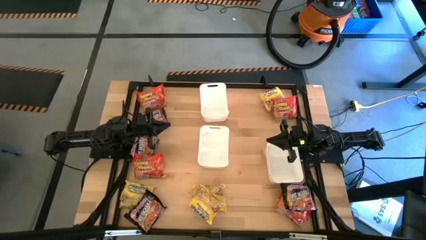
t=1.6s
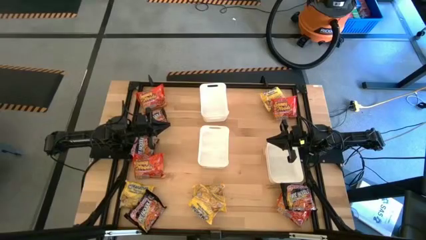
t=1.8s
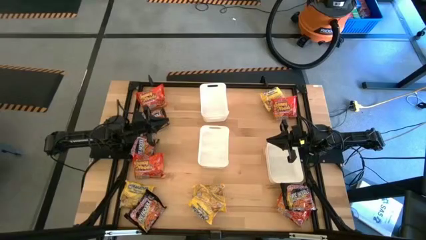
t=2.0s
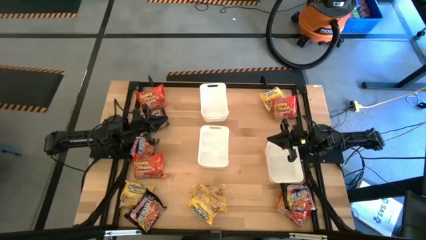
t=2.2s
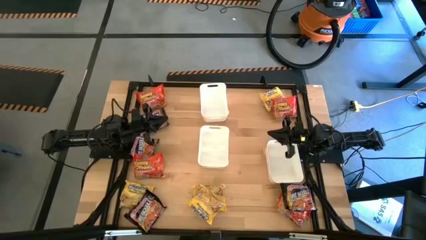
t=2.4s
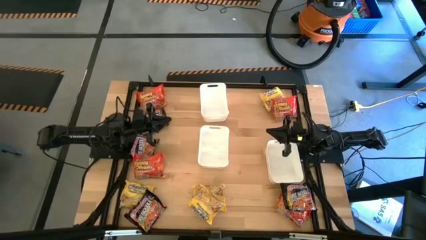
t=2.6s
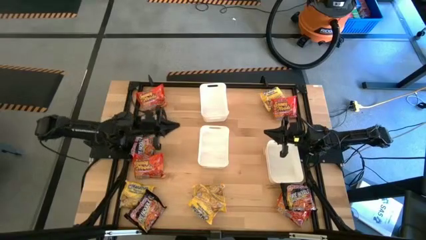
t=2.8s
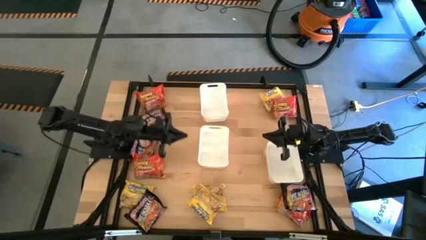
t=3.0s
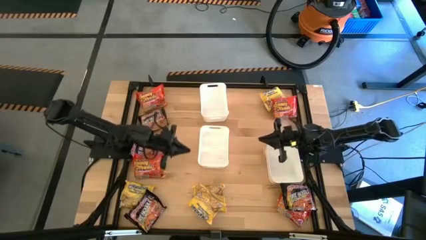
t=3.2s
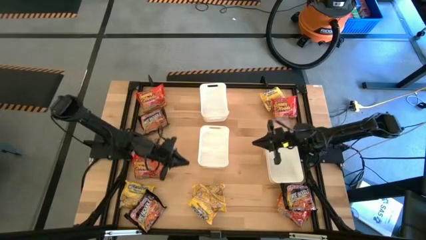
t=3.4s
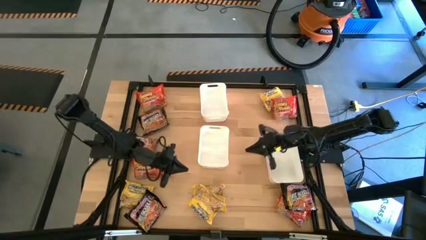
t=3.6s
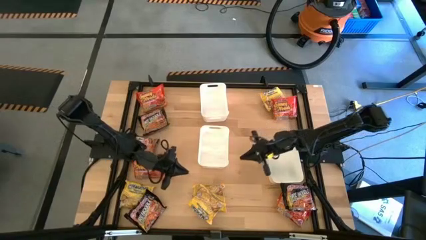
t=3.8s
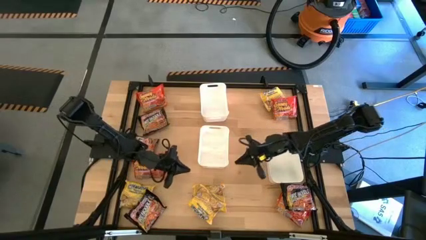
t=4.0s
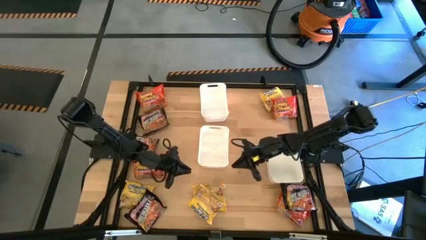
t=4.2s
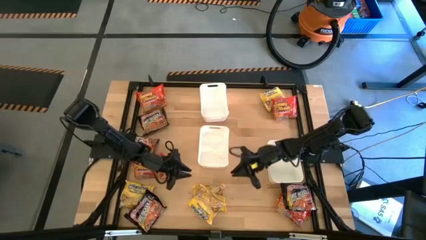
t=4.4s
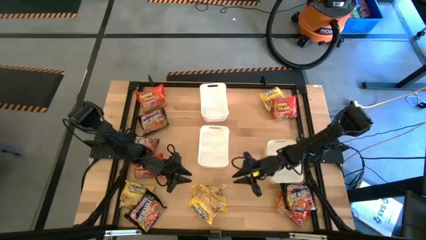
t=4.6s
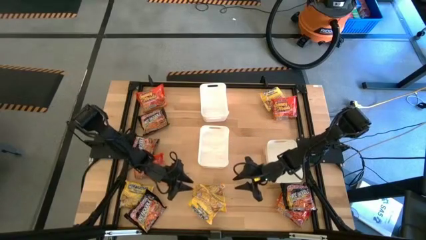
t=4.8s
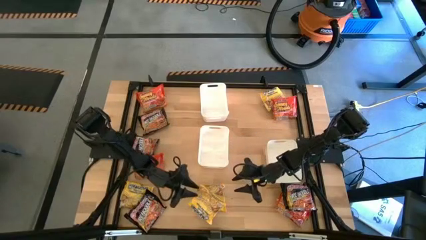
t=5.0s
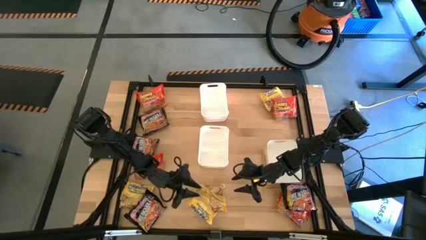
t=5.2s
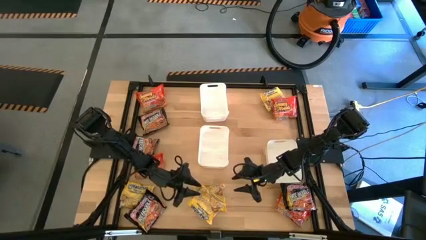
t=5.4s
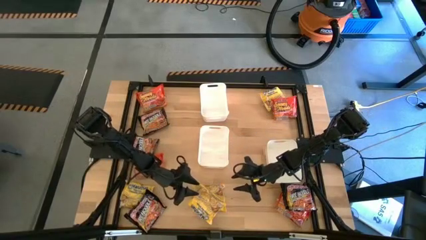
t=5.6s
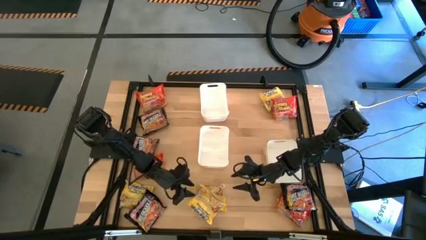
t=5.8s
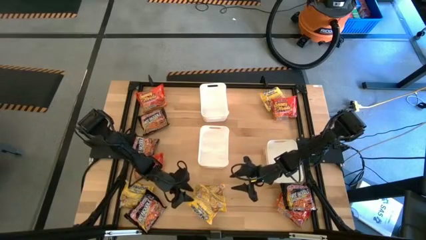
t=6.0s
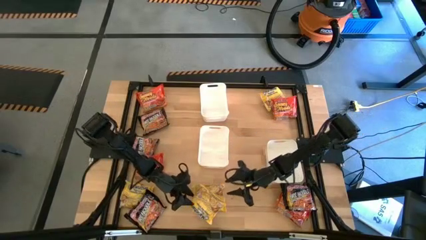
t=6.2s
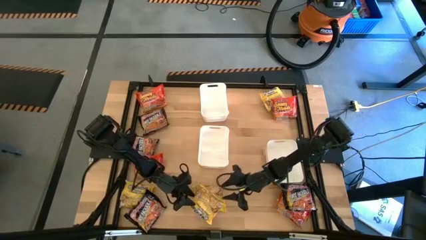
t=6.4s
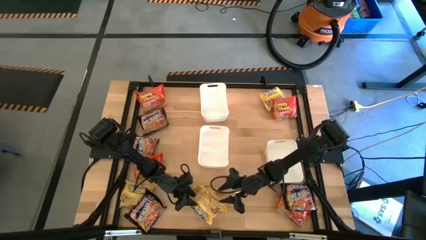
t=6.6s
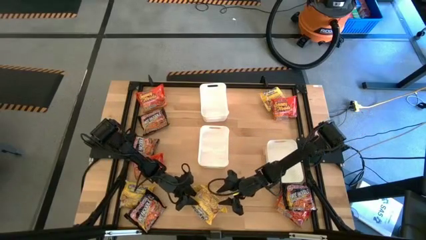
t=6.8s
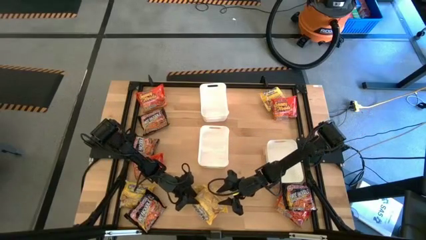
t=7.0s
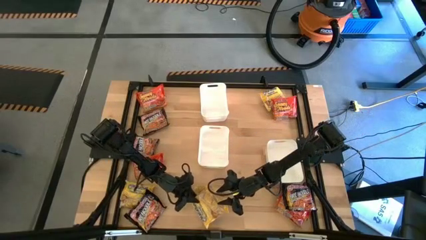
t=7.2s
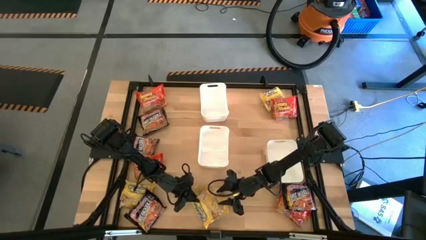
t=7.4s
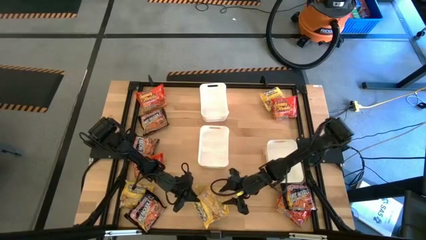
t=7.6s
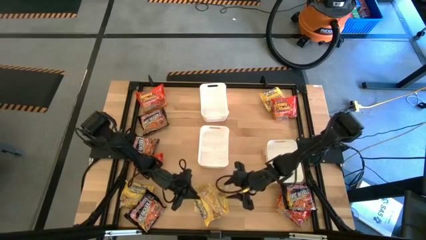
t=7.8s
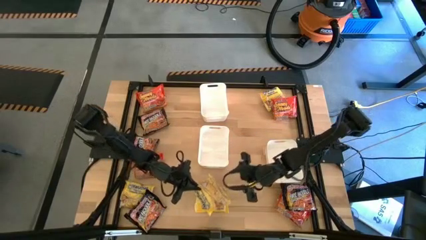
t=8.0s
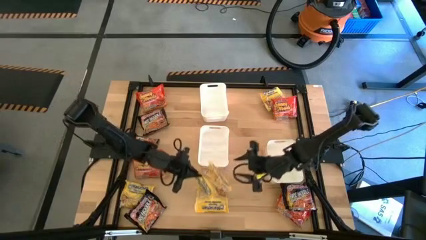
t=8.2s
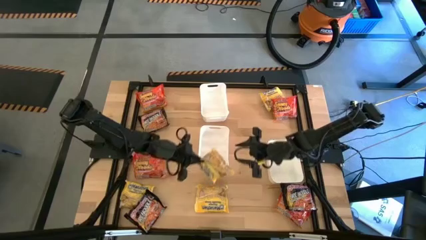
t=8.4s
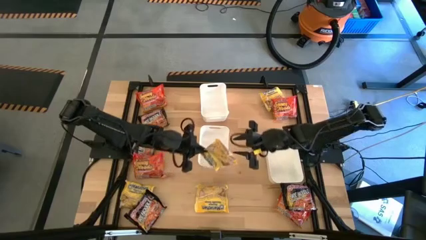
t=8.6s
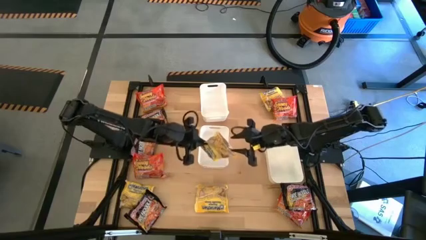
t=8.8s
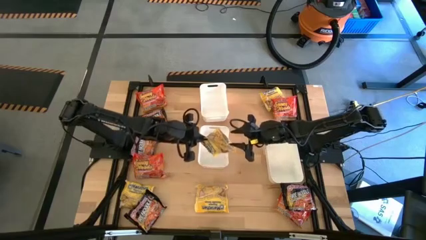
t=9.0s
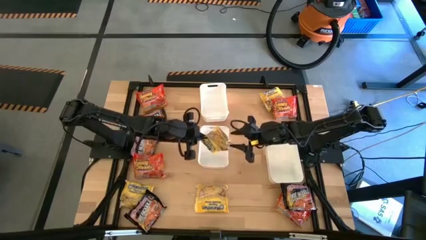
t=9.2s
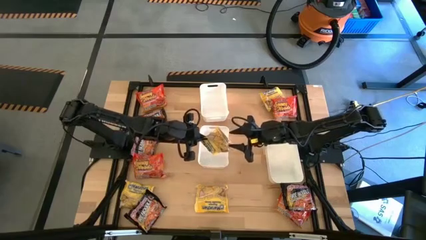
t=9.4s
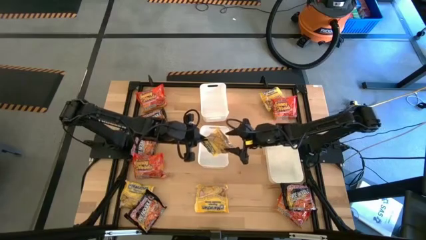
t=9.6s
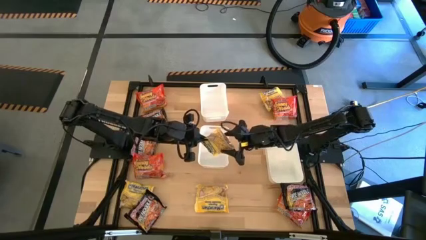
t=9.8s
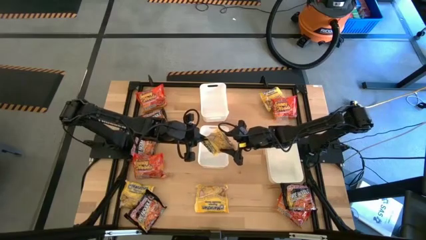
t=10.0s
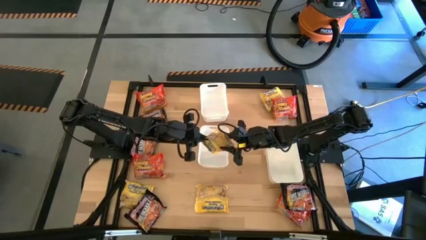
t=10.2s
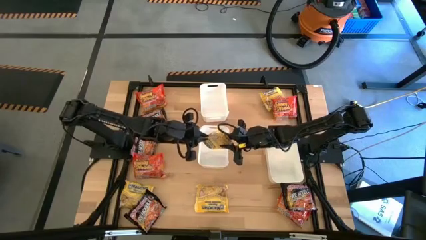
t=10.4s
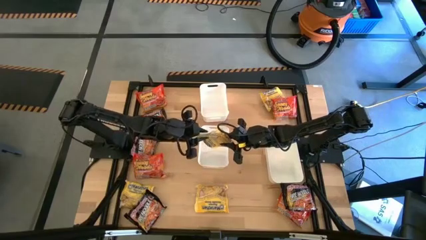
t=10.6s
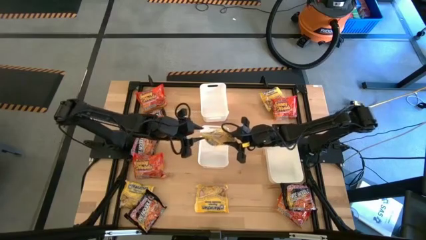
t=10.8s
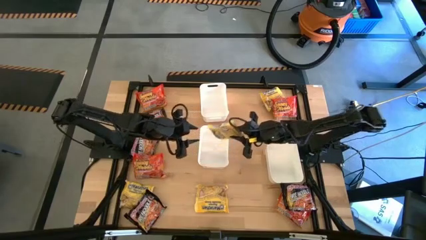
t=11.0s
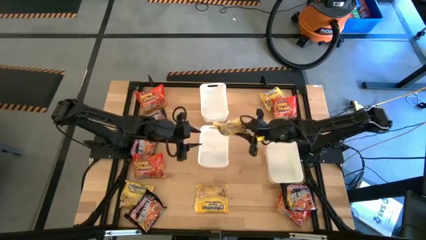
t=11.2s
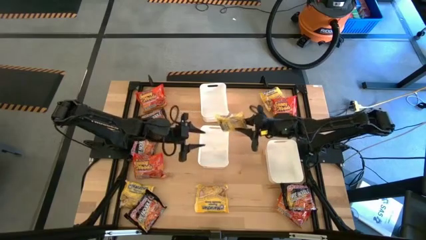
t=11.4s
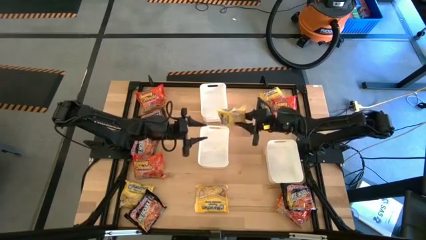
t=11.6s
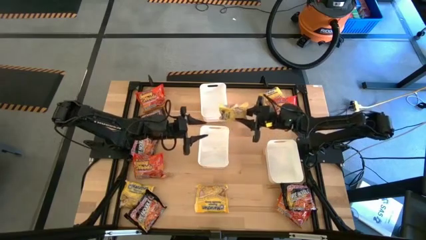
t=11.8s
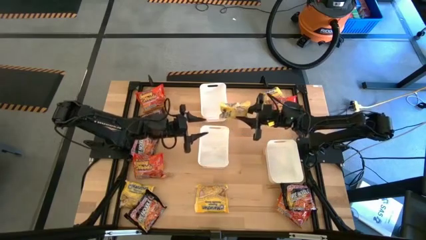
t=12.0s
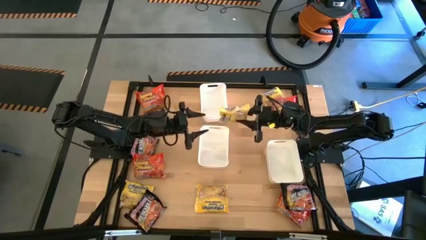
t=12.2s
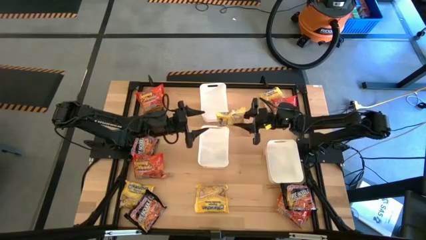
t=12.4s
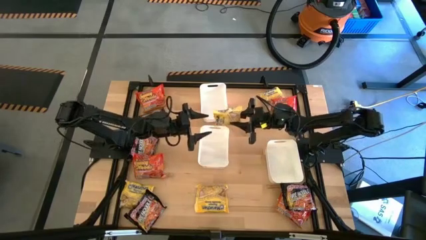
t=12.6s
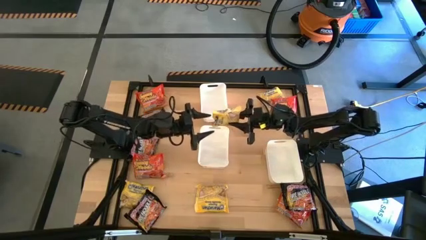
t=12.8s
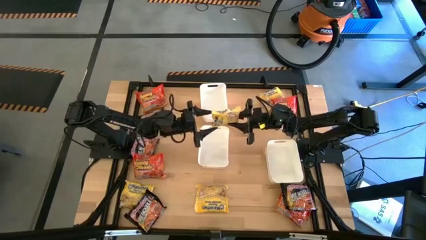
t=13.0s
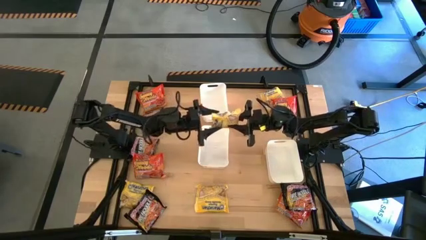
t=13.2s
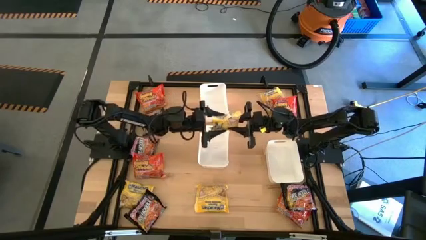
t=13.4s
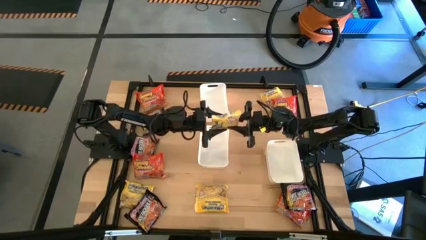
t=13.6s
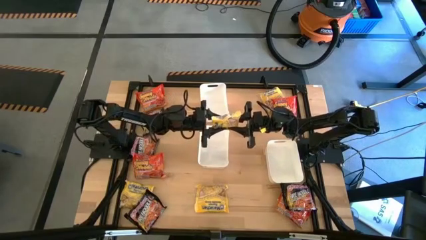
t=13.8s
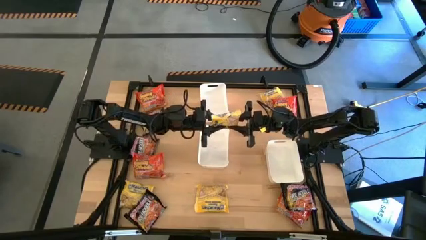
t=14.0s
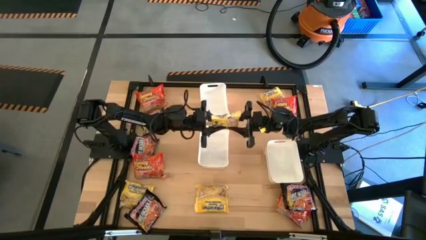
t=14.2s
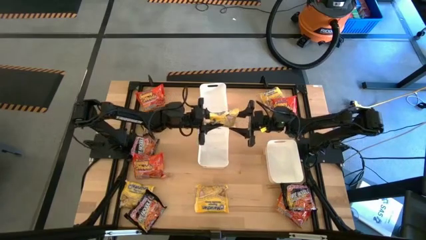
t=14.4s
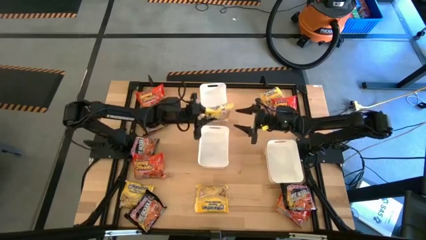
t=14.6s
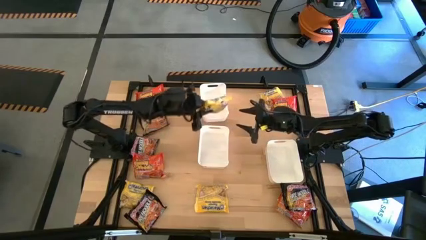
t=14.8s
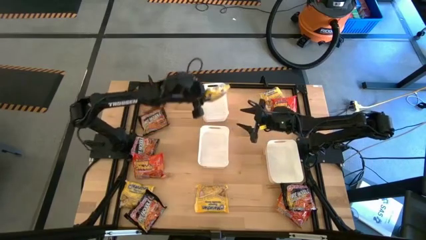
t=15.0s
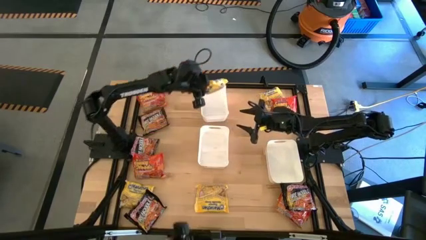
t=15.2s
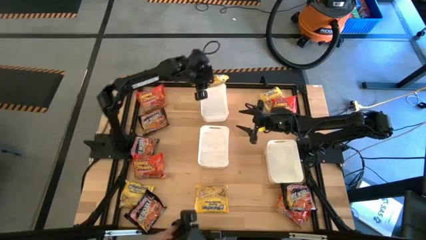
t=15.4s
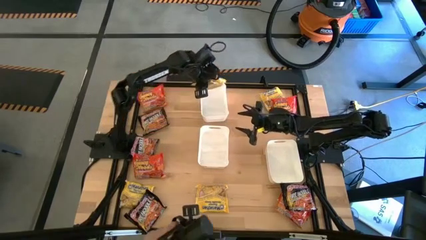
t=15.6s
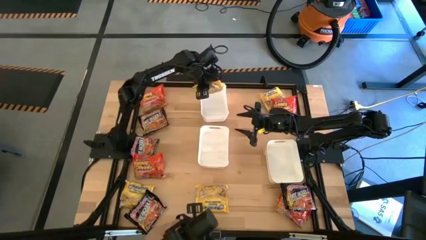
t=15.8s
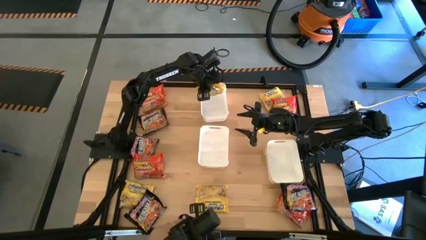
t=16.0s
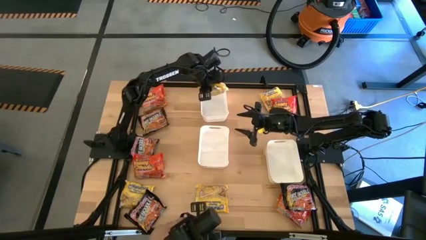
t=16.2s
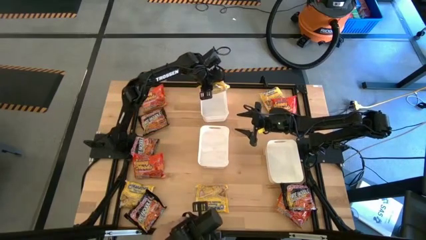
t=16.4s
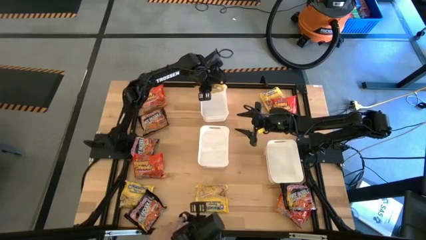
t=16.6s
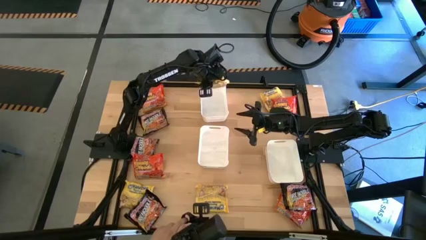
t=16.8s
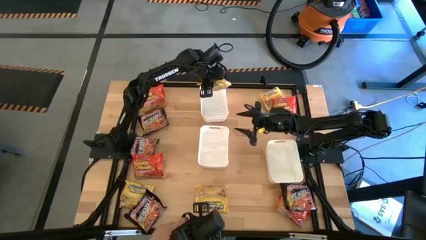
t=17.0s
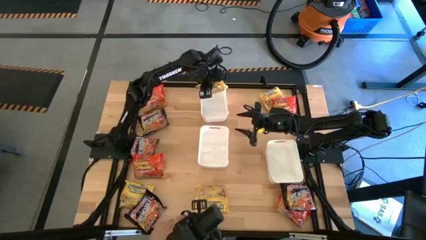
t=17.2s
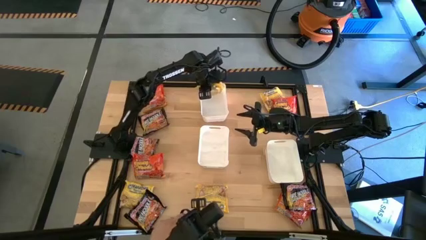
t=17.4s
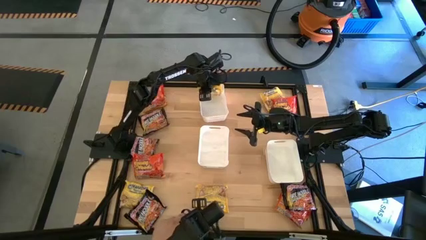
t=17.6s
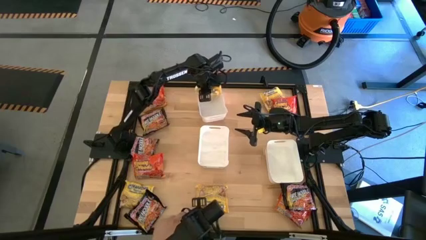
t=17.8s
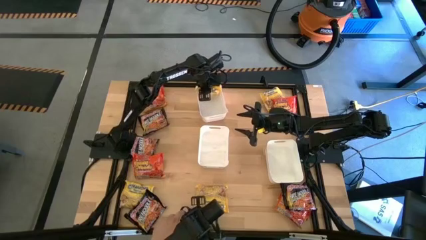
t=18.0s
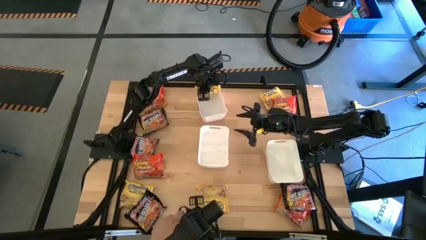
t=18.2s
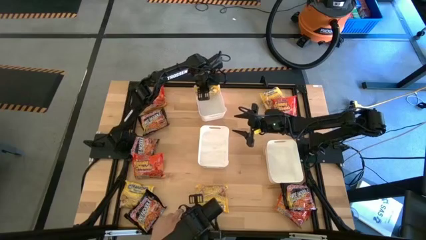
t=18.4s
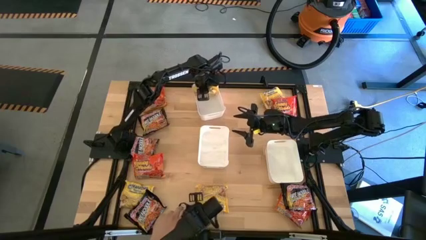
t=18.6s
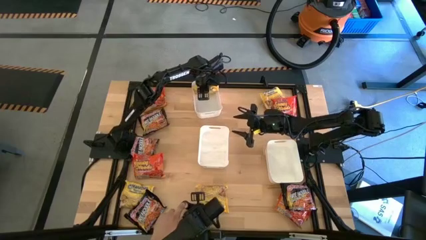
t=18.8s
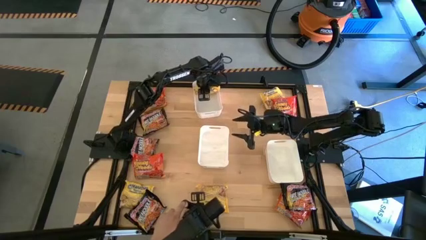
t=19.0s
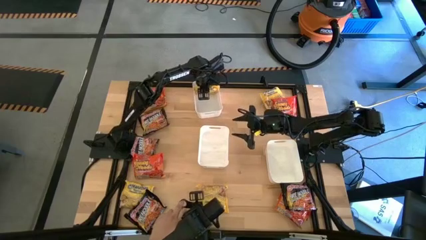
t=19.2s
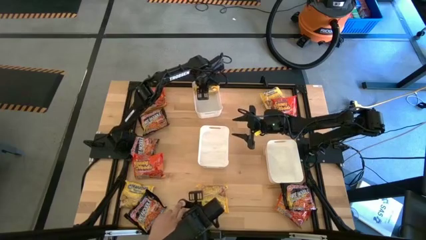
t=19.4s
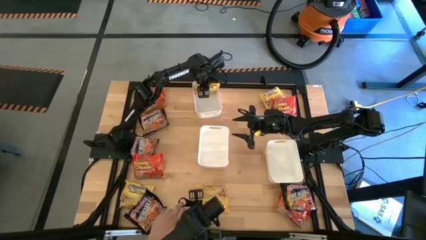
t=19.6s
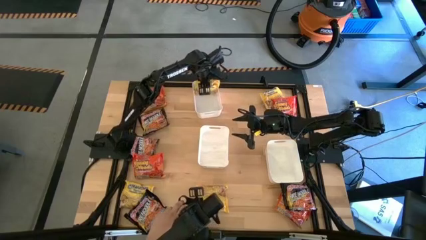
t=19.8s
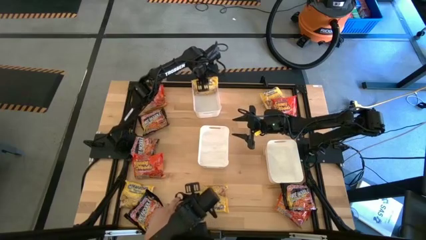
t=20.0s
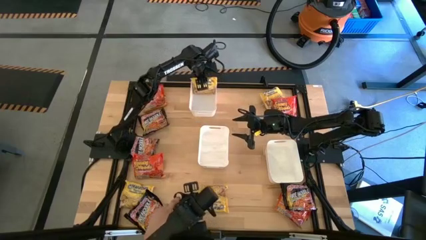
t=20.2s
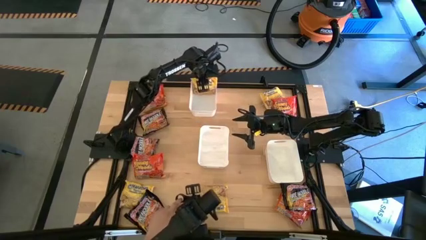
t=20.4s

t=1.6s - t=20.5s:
Task: Sort Maruchan noodles
Put the yellow noodle pack into the top white bin
